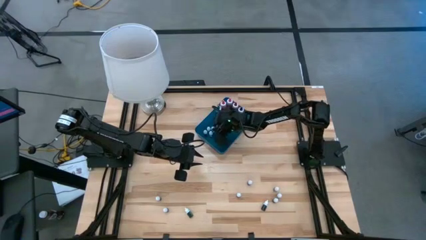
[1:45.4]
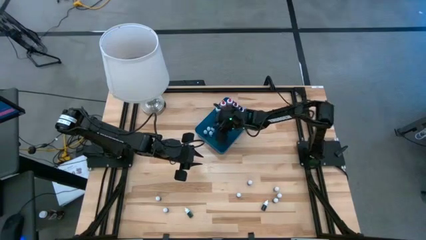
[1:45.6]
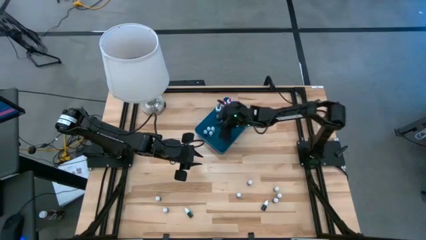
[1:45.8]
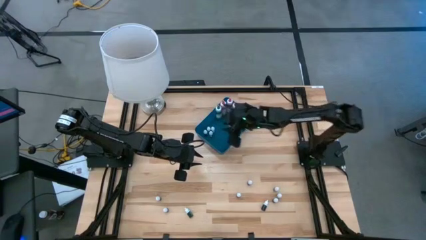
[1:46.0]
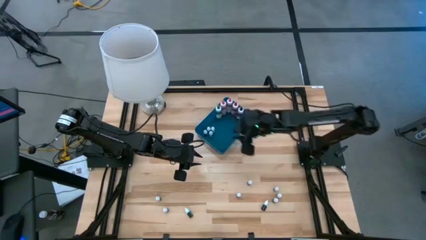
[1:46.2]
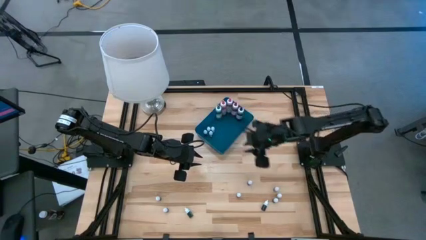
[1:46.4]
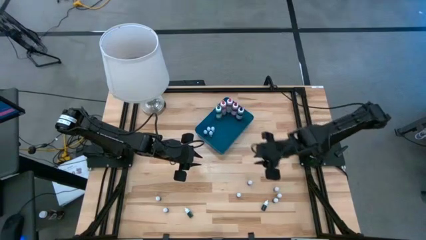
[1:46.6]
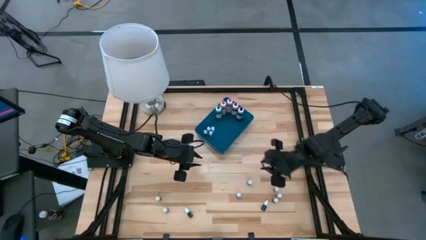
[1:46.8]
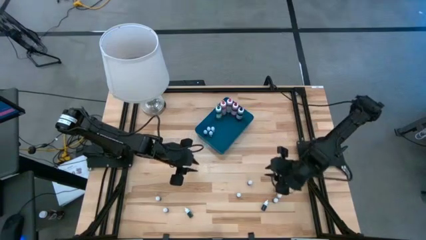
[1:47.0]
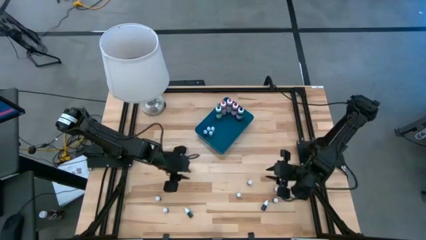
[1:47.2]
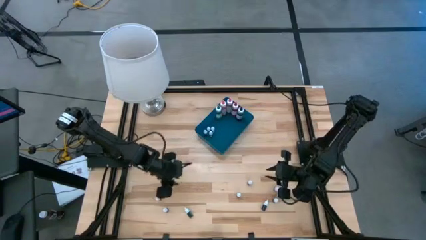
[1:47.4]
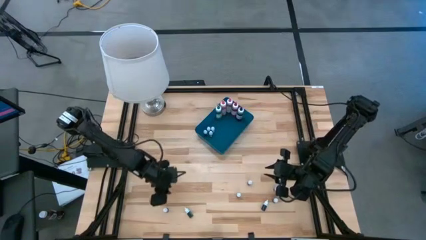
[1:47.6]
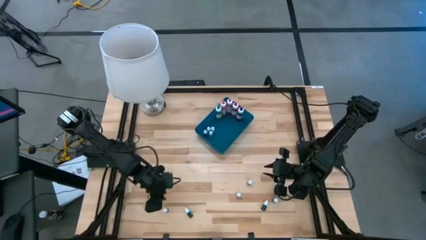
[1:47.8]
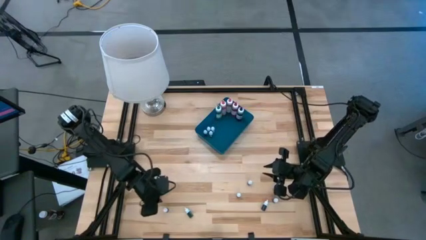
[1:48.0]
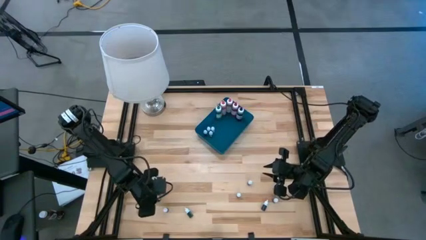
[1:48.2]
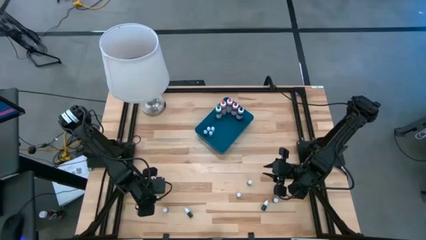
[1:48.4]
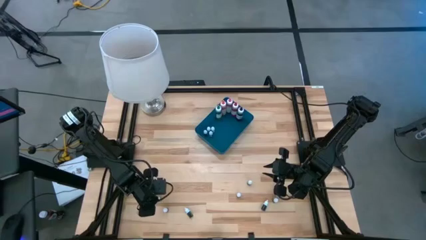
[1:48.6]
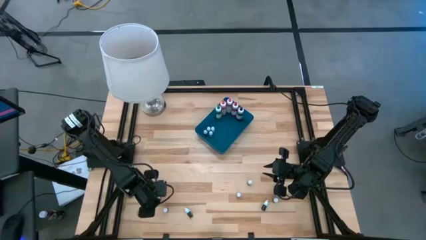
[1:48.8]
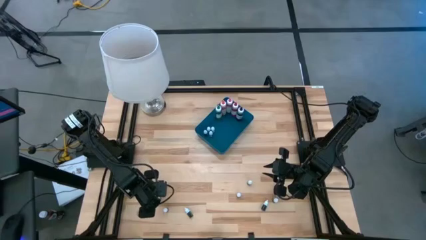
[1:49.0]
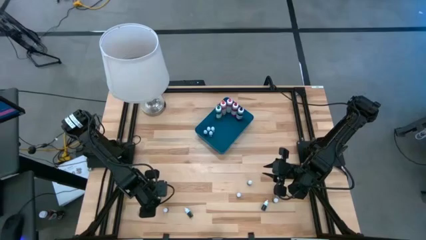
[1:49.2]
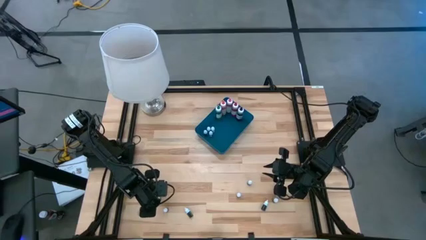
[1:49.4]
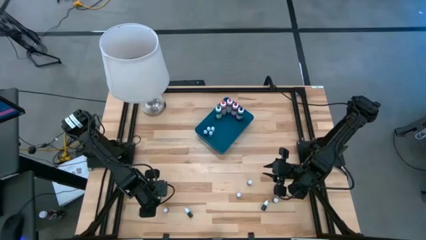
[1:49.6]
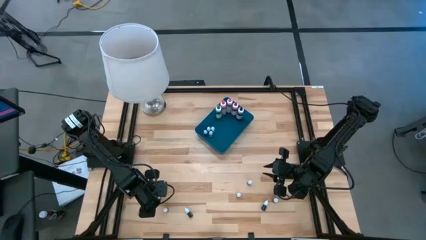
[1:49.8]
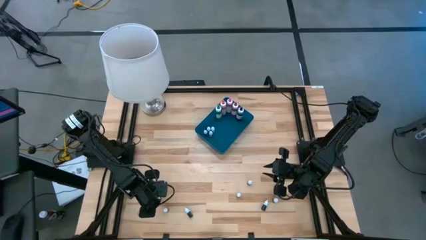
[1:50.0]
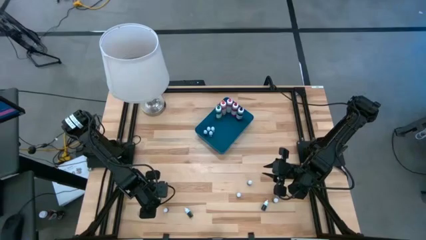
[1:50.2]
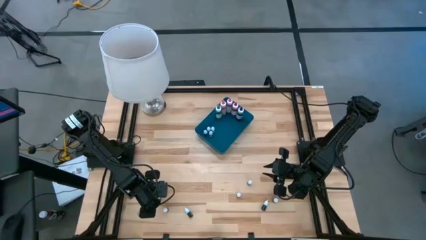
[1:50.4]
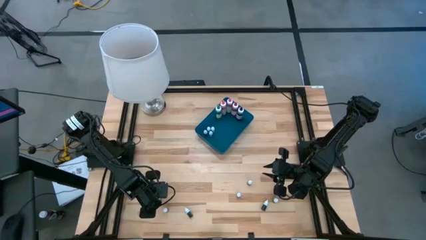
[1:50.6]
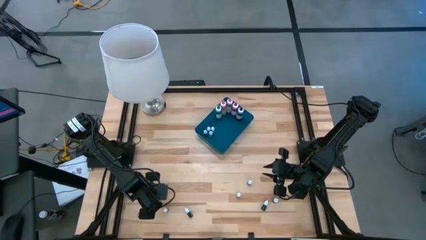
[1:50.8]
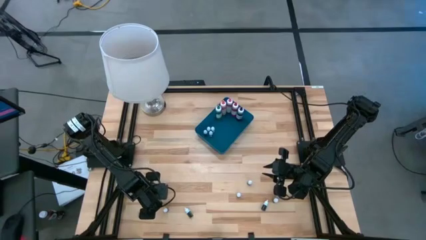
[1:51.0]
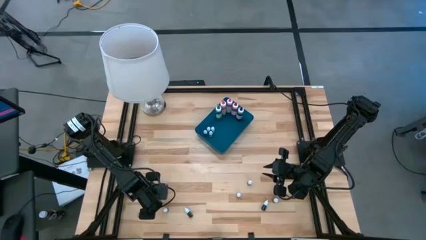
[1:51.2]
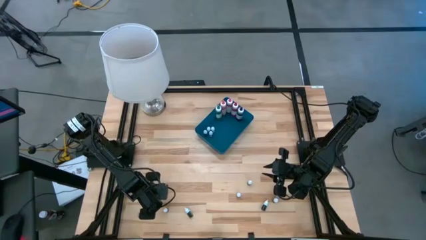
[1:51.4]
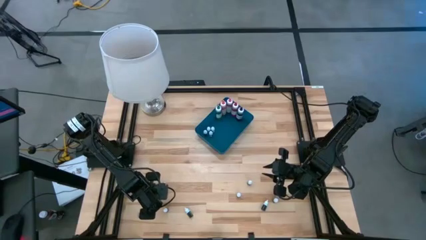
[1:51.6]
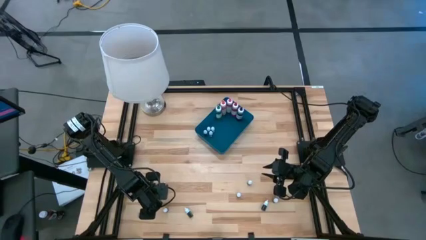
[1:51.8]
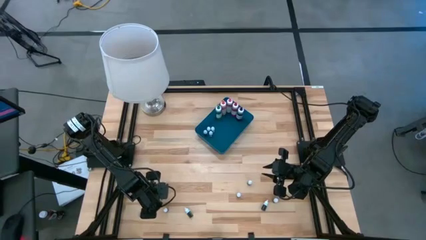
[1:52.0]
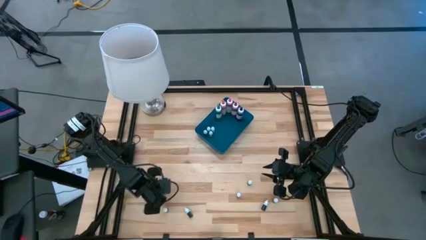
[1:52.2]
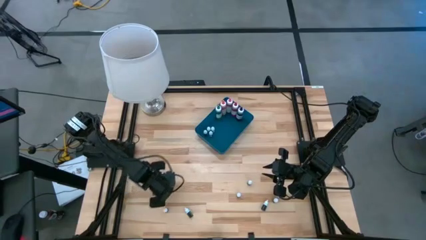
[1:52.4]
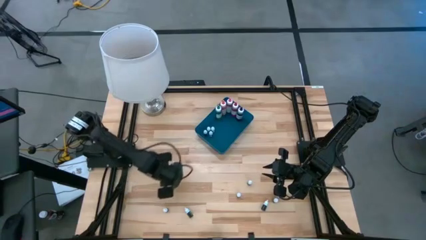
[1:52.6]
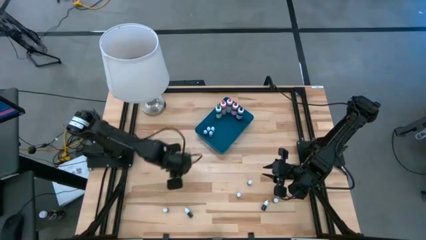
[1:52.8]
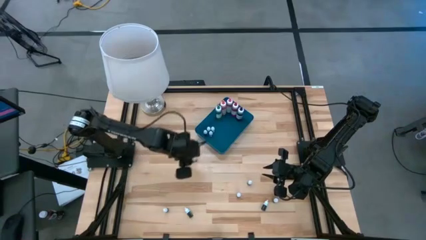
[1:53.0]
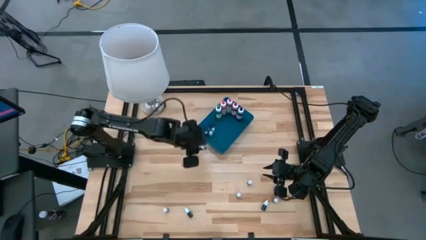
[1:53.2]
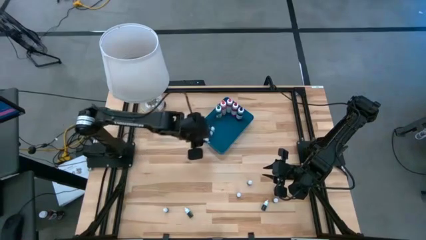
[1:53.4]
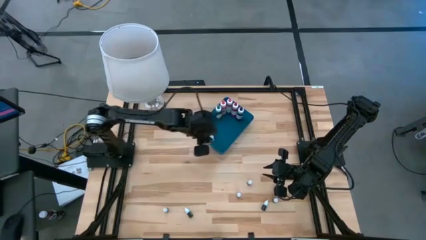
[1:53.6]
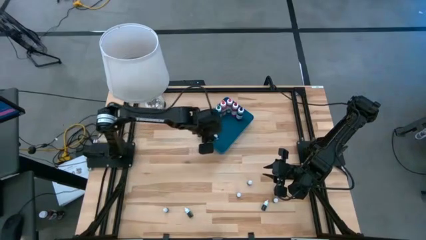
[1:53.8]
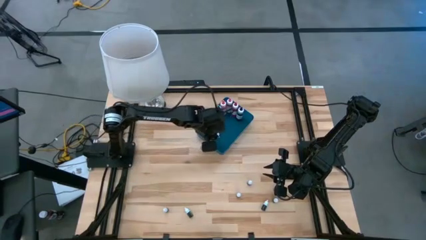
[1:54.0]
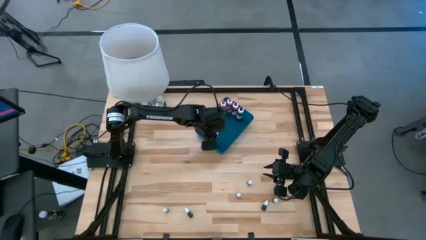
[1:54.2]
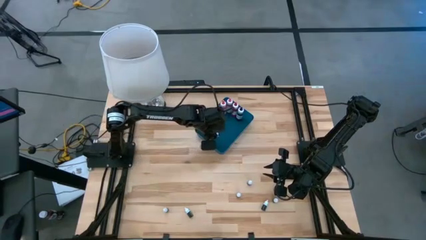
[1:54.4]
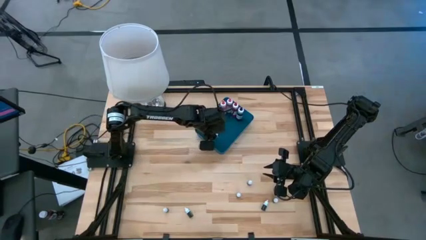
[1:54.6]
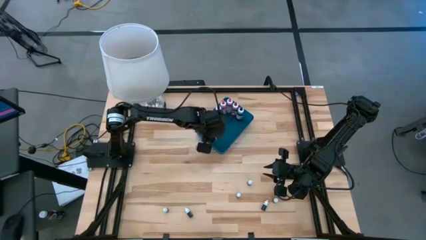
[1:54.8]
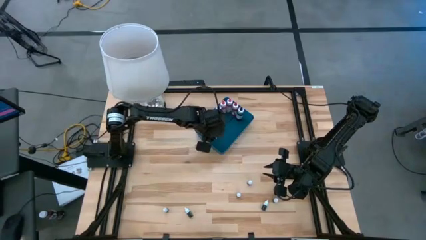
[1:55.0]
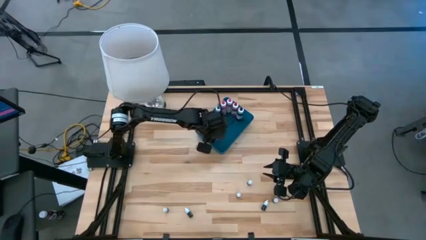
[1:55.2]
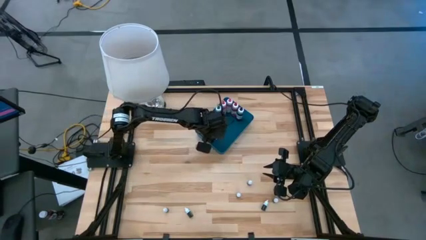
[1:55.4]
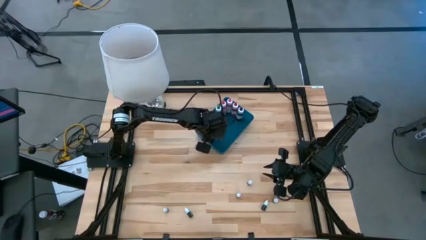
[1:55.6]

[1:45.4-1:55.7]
Task: Pick & Place food coloring
Put the small black food coloring bottle into the blue container

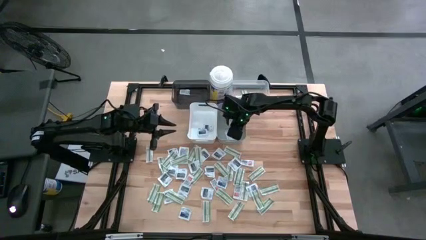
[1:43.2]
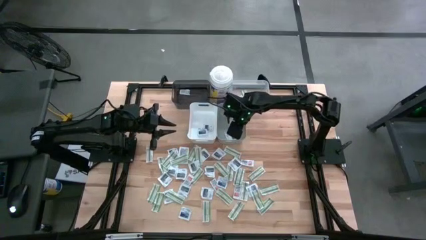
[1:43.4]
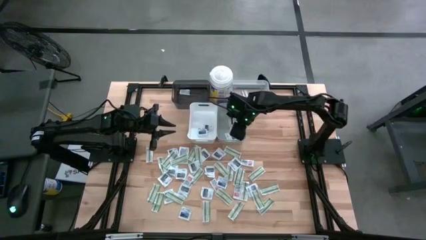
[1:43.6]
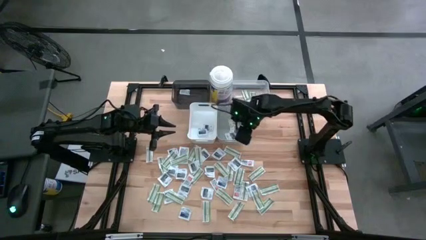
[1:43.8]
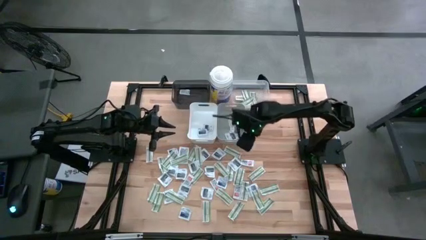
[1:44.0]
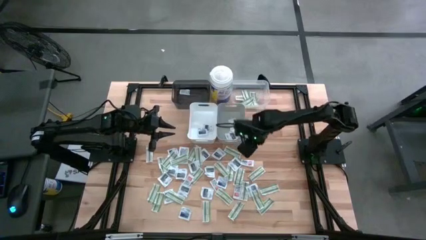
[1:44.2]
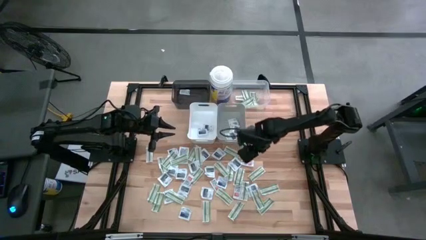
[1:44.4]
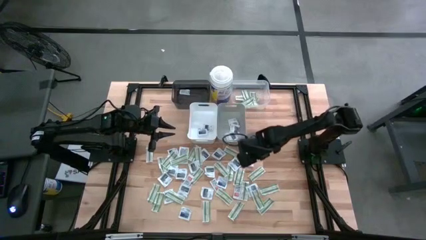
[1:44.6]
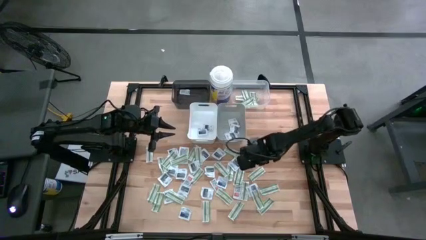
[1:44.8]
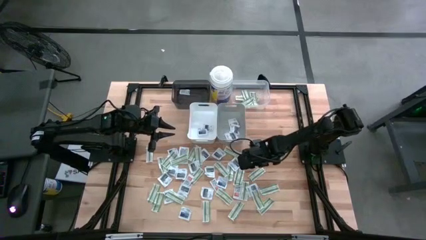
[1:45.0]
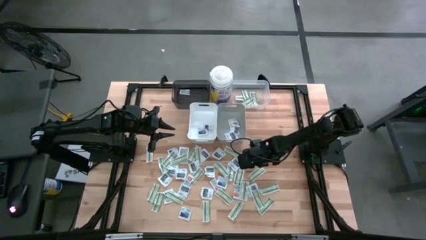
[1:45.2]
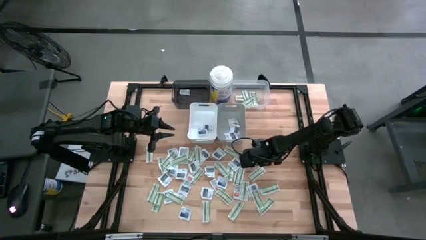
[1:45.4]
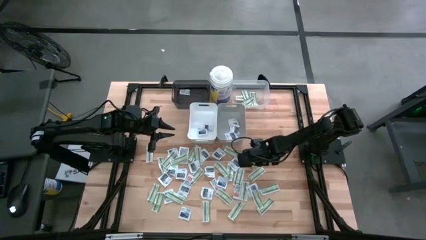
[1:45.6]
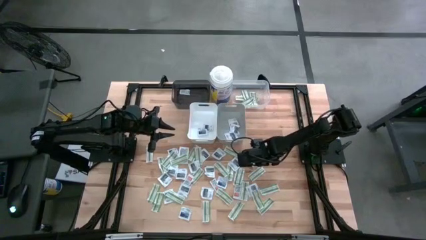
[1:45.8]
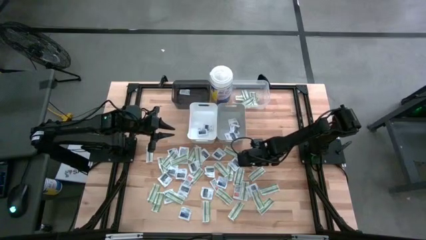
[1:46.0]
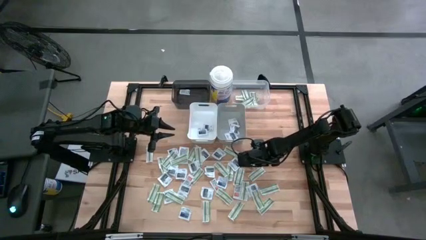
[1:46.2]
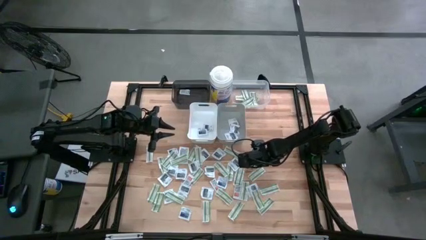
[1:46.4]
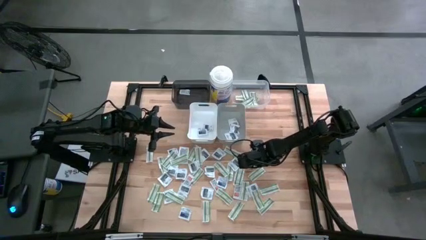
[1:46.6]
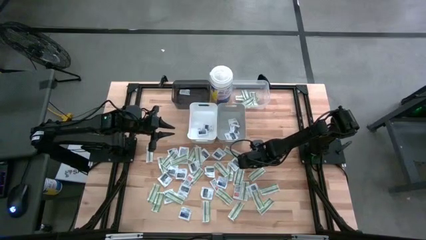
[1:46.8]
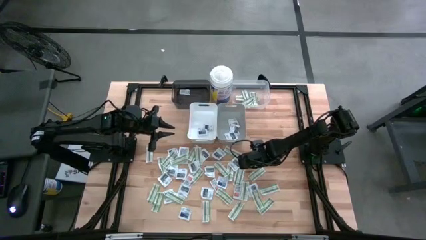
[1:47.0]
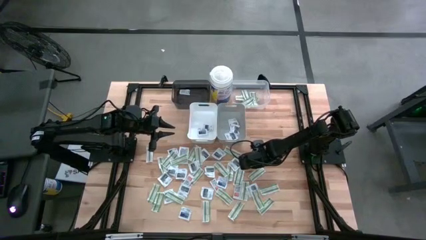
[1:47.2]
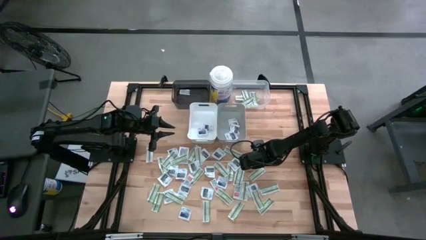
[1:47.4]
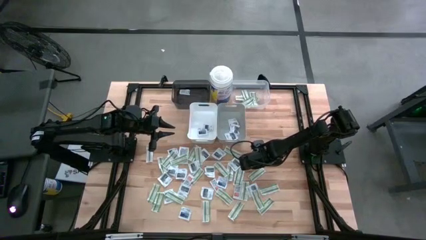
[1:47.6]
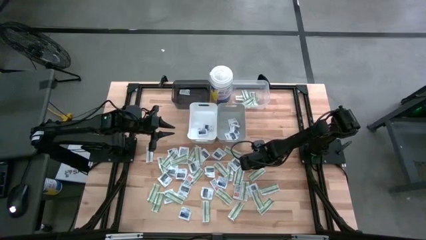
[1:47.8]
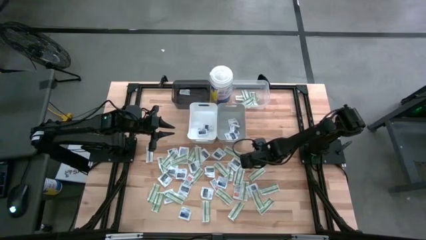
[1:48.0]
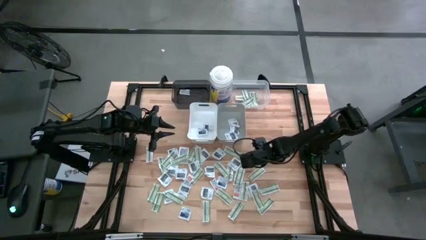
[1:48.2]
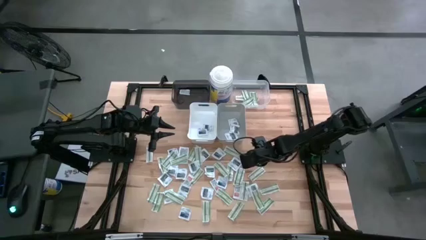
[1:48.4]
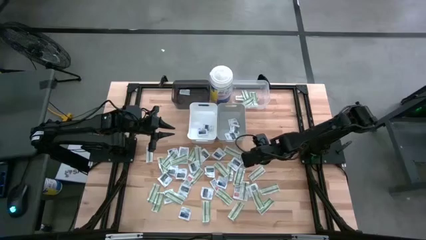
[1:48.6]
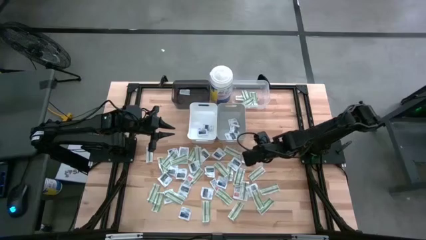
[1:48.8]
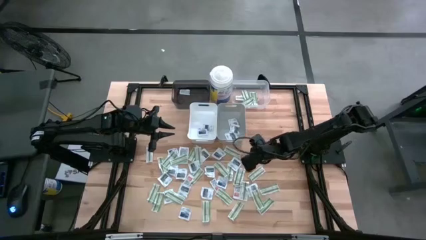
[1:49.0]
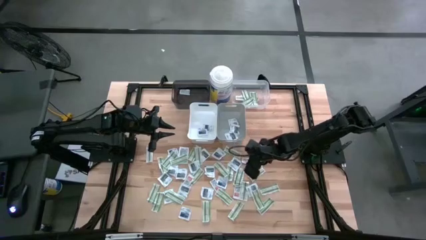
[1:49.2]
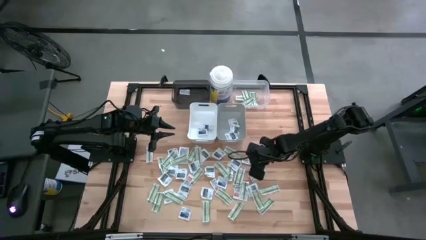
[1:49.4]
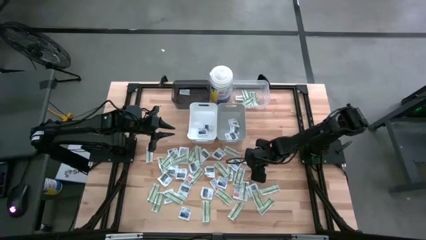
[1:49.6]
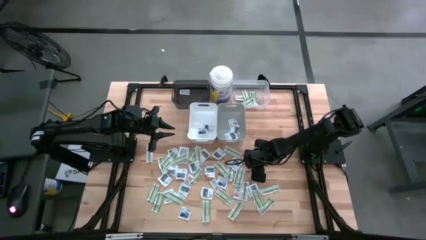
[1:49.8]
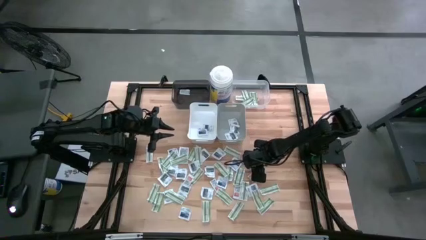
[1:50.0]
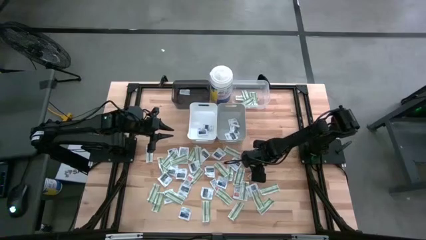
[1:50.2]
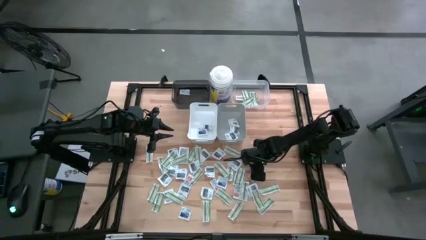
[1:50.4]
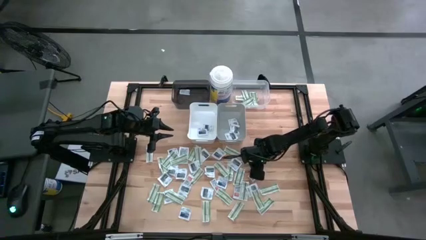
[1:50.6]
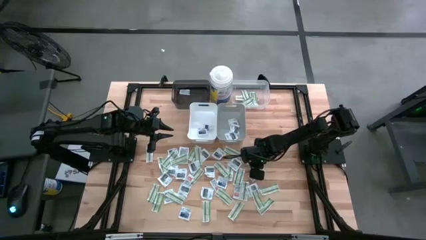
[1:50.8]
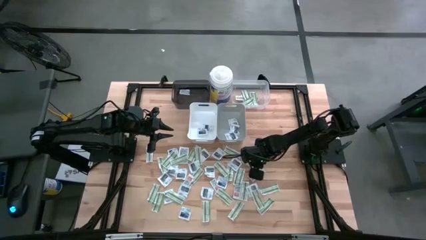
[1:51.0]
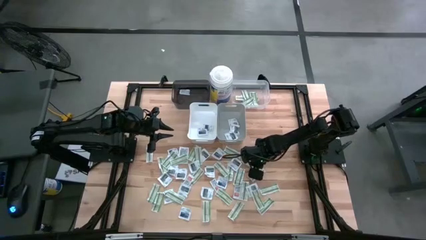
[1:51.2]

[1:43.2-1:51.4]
Task: Pick & Place First Aid Supplies
Put the ointment into the black transparent bin
